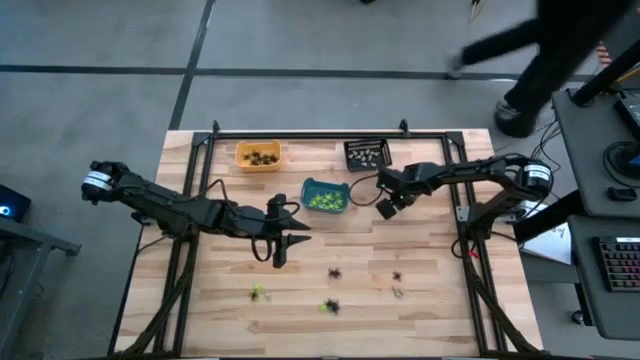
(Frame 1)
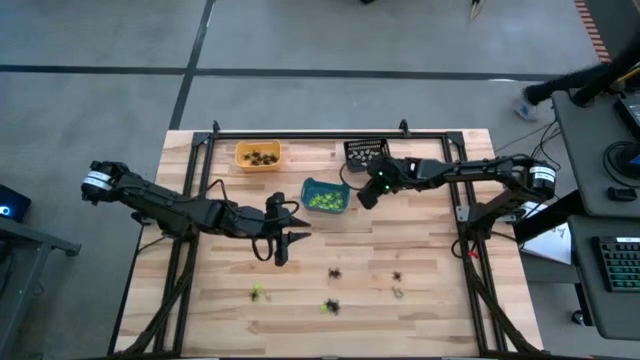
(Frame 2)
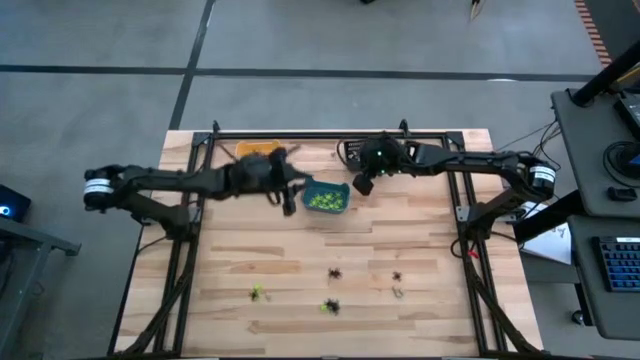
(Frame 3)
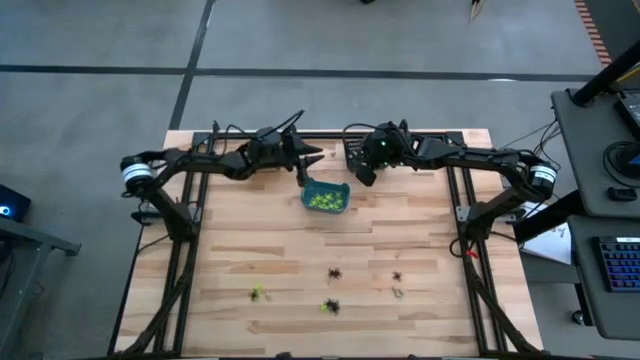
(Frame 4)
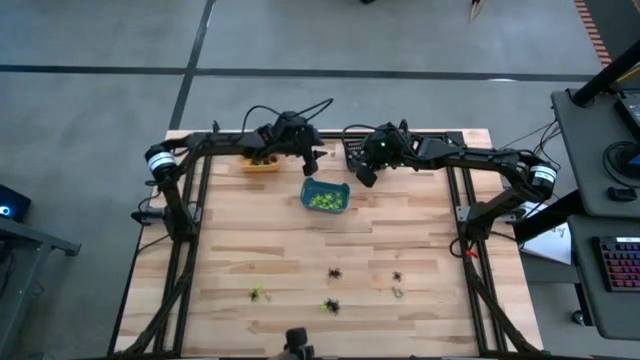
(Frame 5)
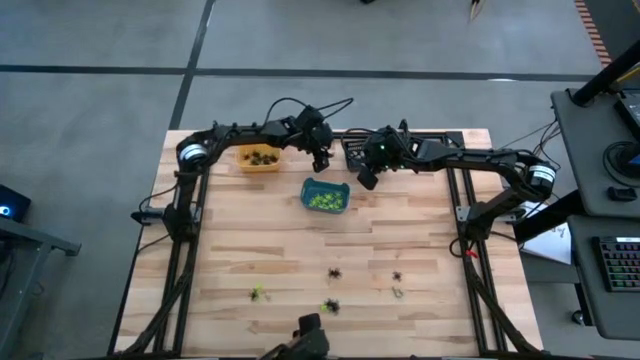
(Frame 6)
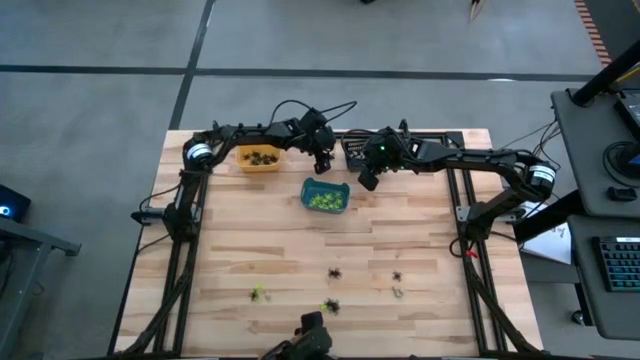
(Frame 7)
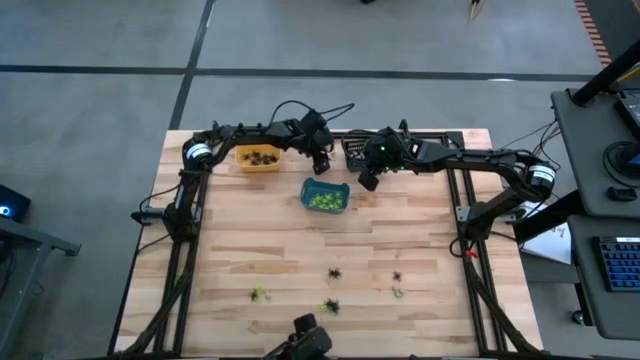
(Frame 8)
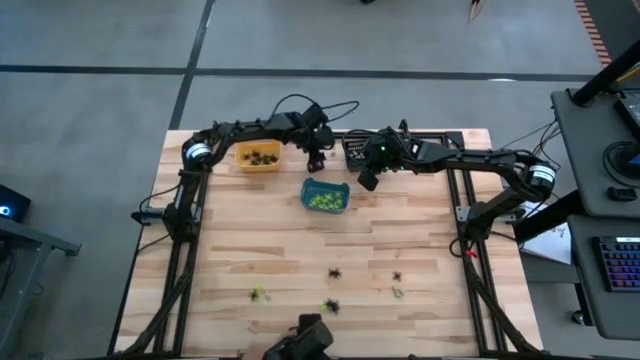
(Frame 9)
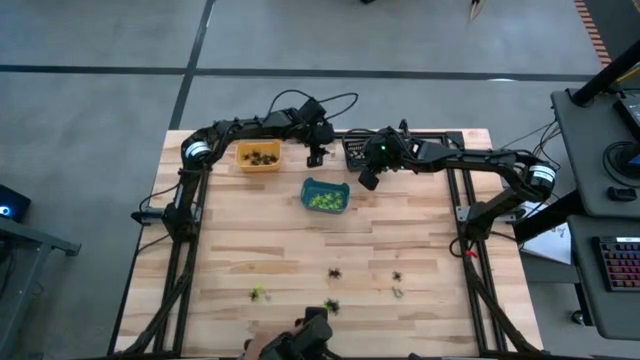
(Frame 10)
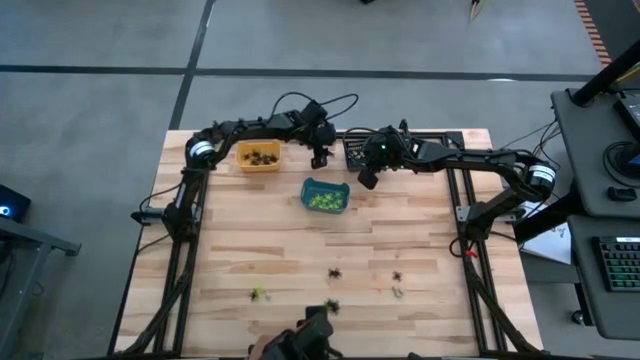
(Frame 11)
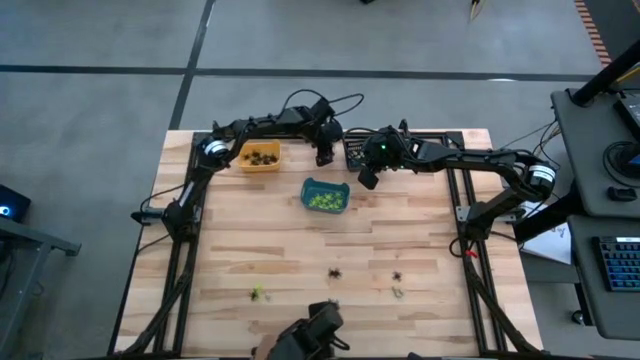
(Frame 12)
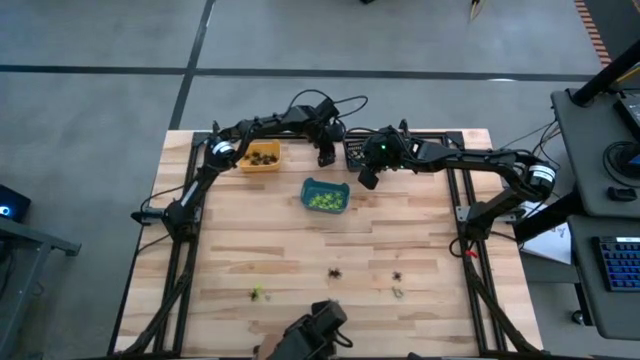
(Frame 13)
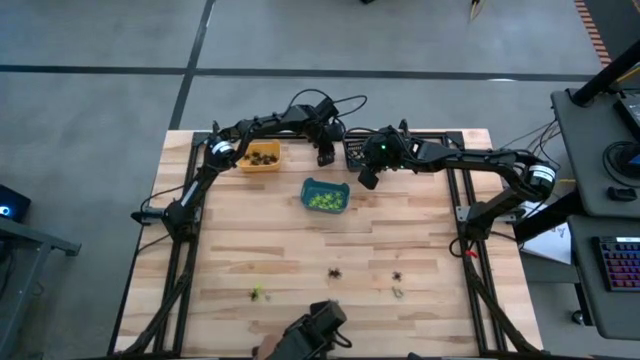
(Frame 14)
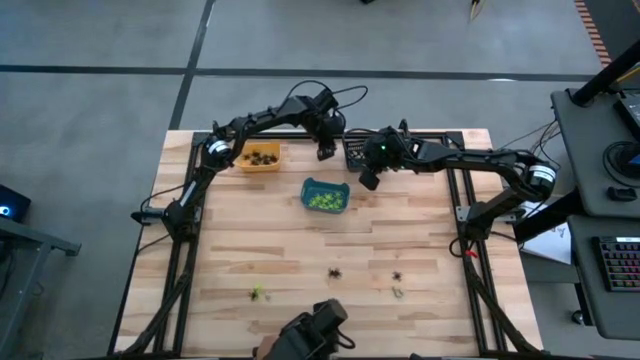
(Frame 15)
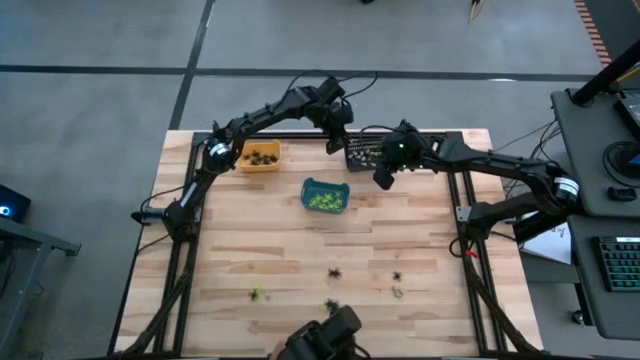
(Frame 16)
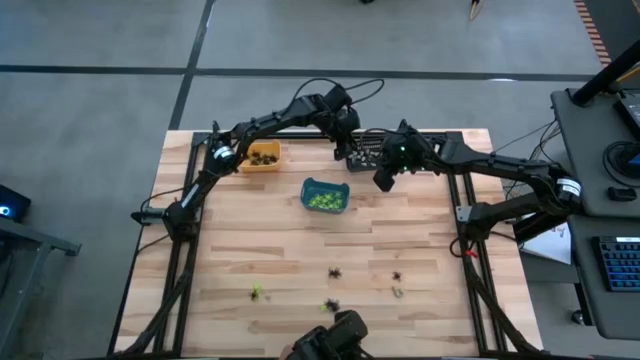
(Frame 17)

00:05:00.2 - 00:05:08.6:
Task: Sort Halloween decoration
Put the white skull toy into the black bin

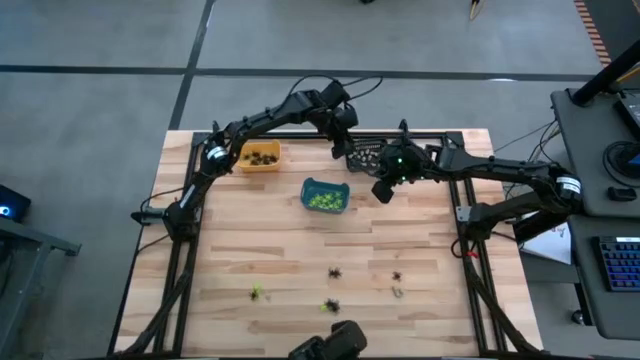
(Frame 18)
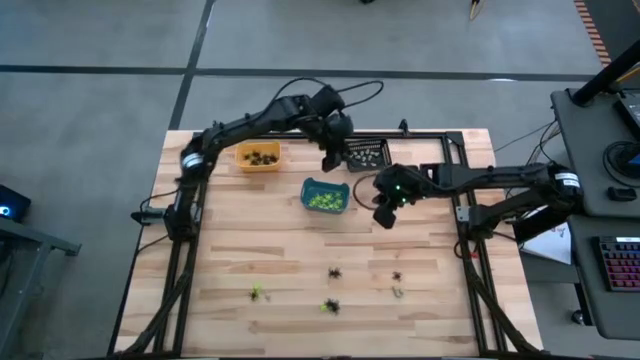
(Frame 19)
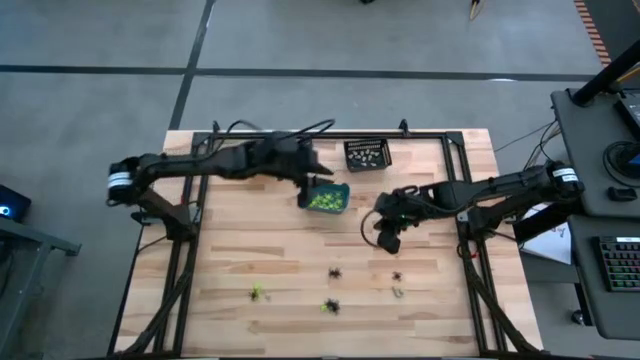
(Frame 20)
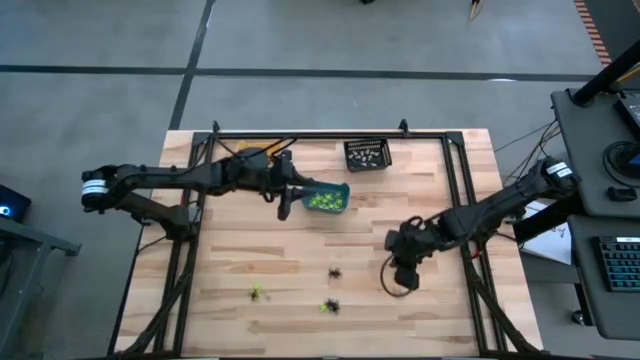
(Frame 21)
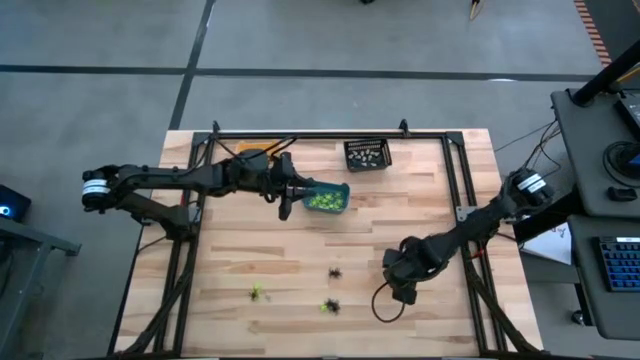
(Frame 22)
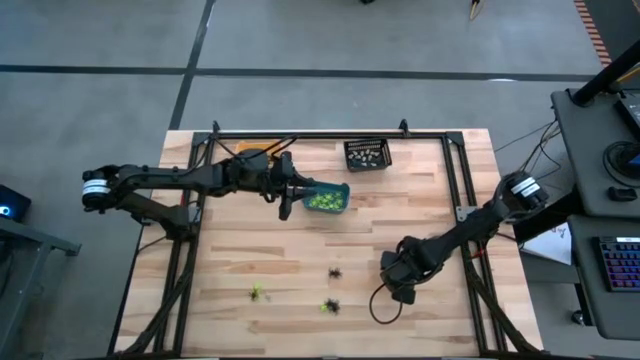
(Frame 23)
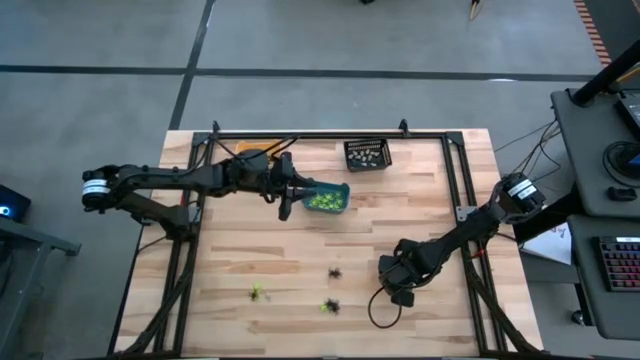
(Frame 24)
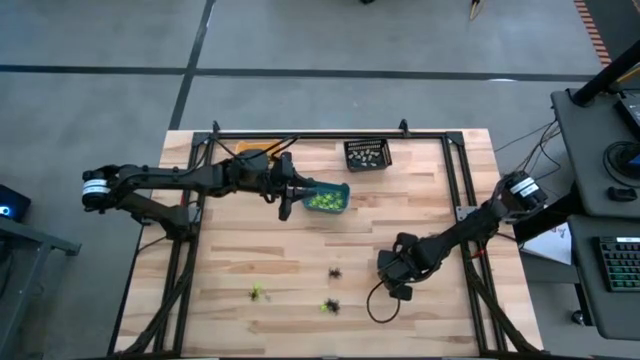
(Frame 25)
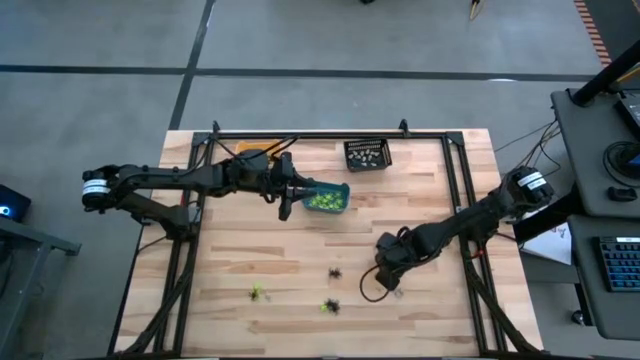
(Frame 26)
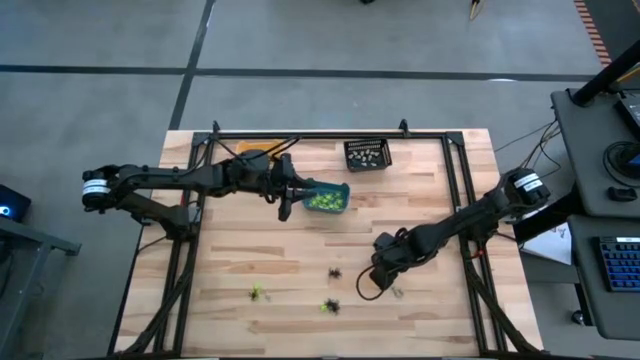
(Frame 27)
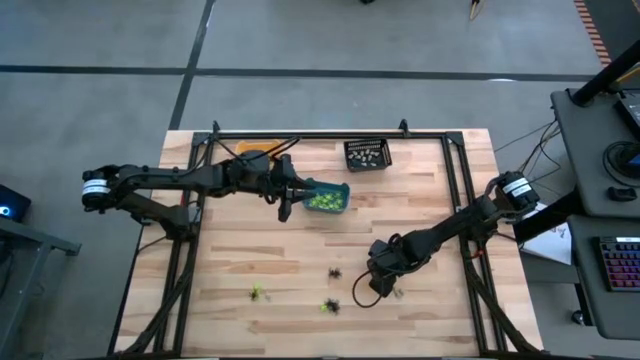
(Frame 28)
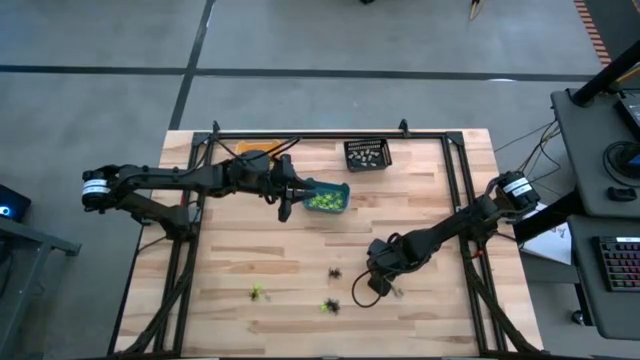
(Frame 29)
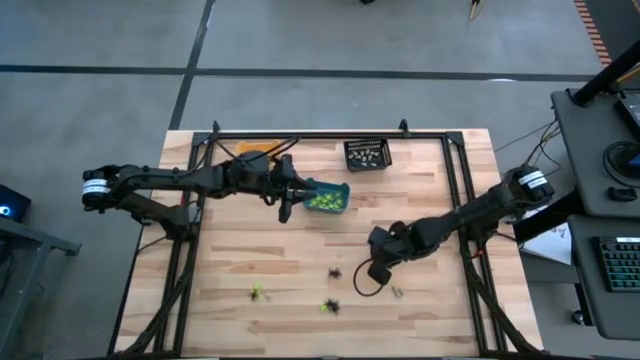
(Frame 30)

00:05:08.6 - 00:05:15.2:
Put the black spider toy into the yellow bin

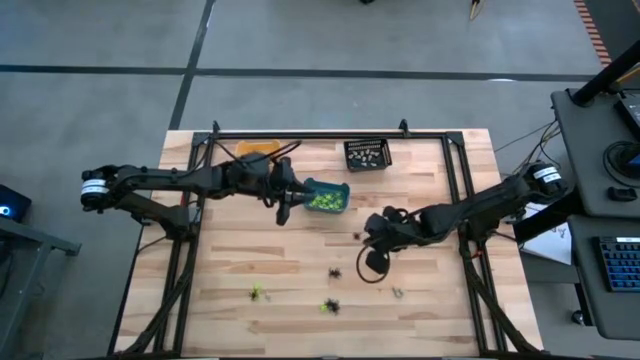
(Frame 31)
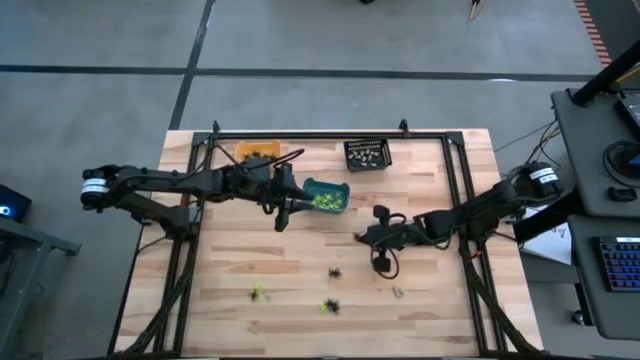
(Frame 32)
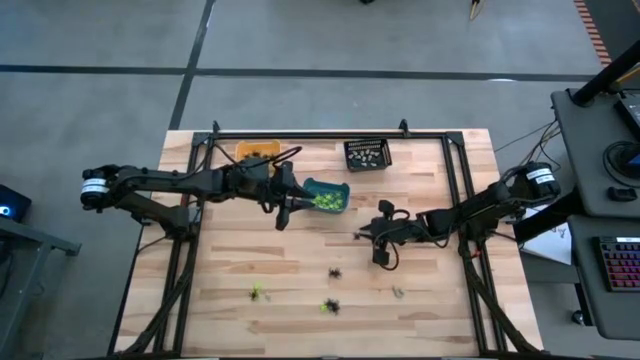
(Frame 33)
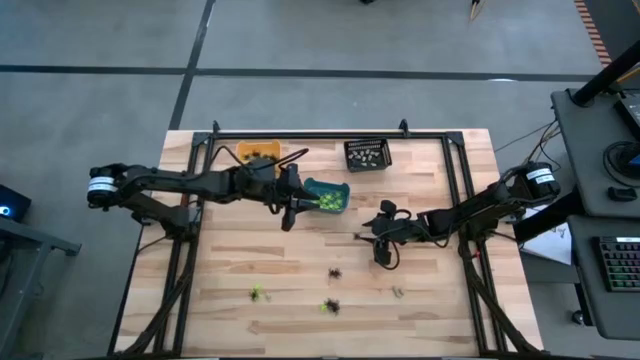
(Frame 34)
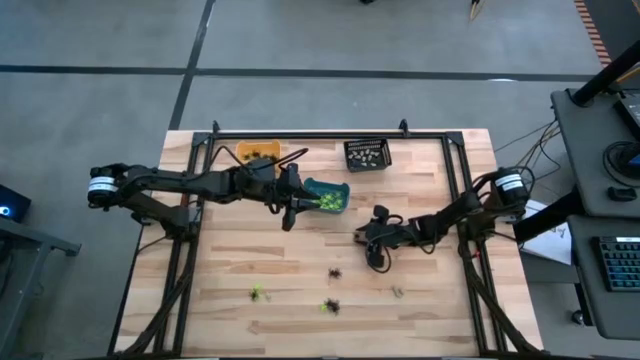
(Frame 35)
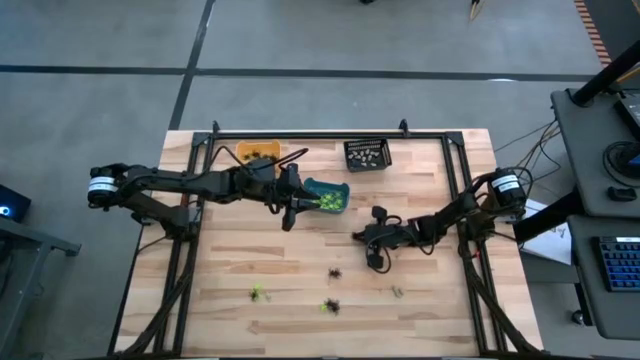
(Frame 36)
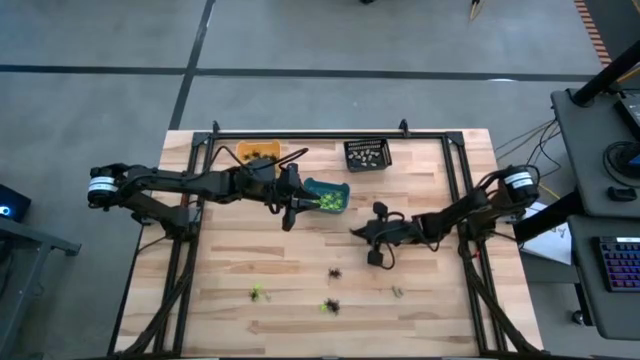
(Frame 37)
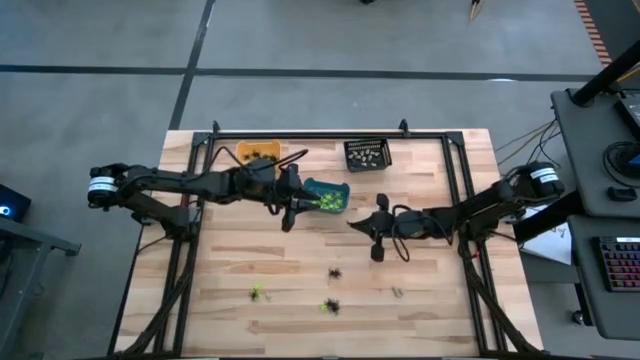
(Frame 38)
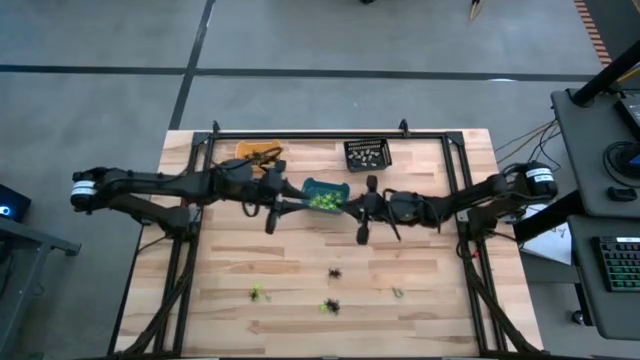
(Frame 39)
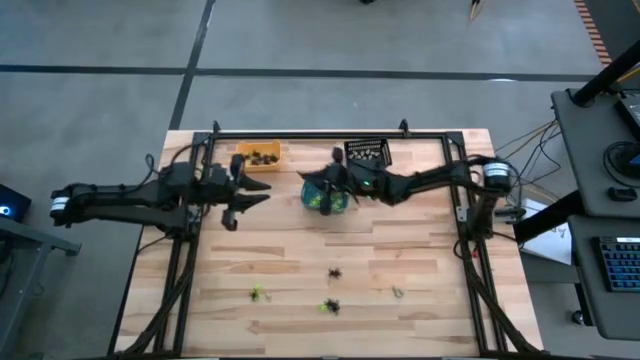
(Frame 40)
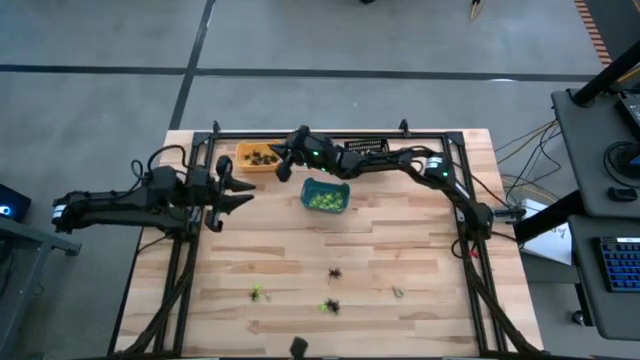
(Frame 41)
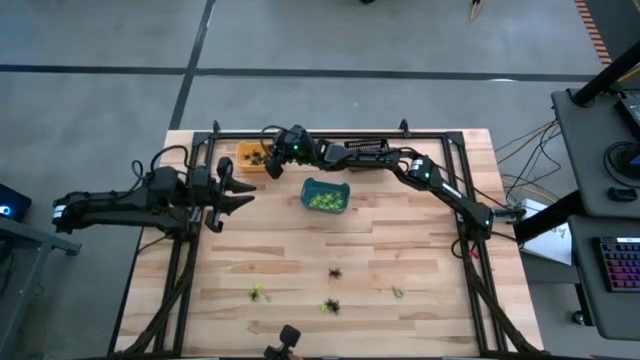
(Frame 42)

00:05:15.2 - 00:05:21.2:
Put the black spider toy into the yellow bin
